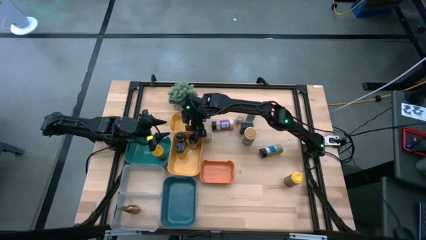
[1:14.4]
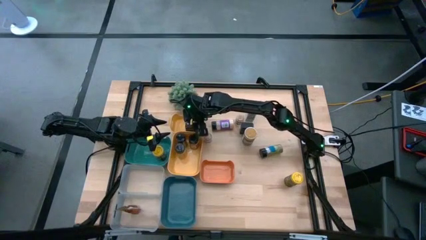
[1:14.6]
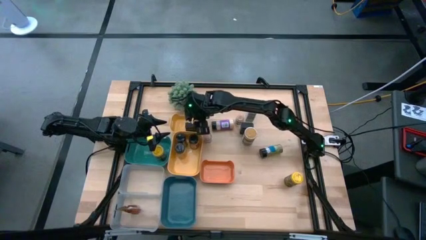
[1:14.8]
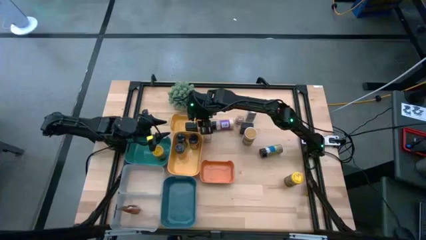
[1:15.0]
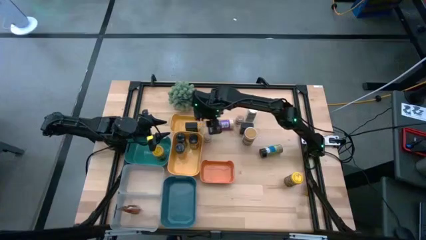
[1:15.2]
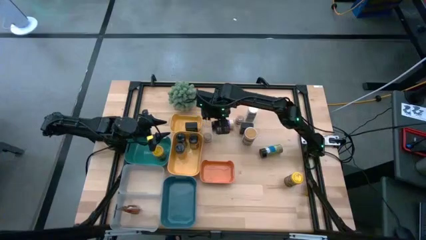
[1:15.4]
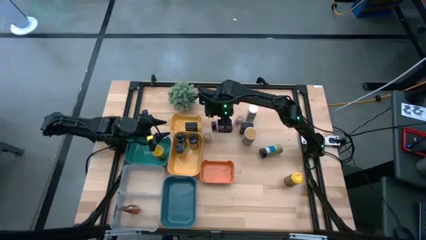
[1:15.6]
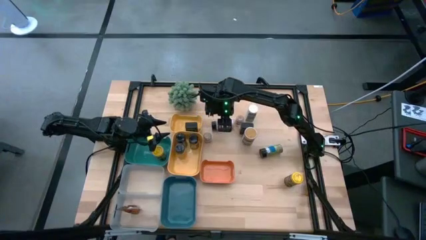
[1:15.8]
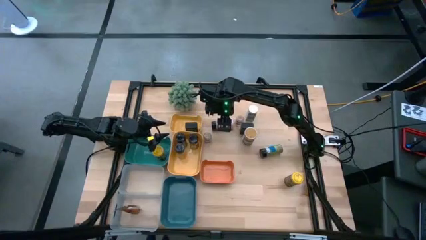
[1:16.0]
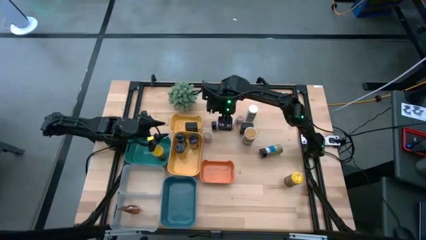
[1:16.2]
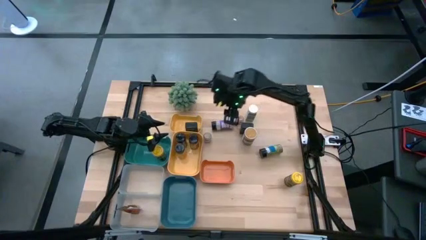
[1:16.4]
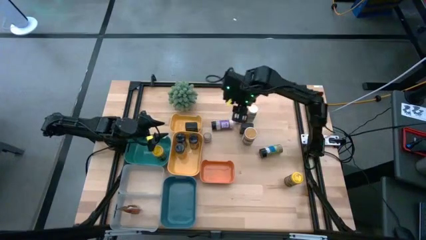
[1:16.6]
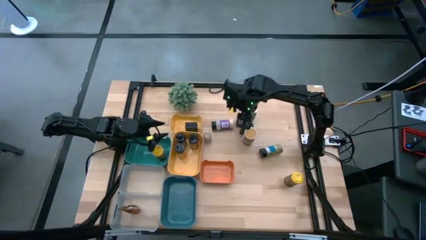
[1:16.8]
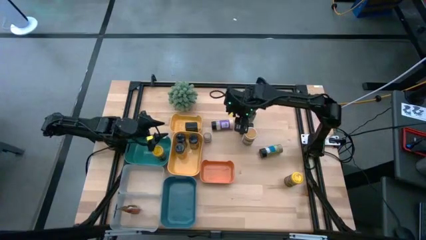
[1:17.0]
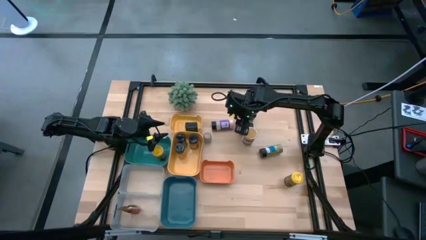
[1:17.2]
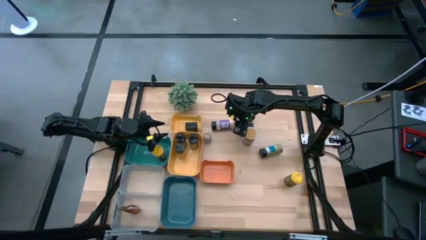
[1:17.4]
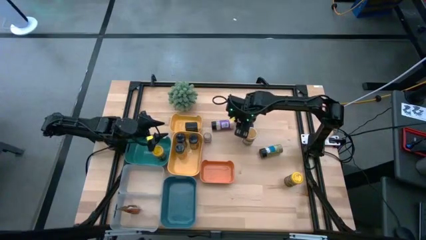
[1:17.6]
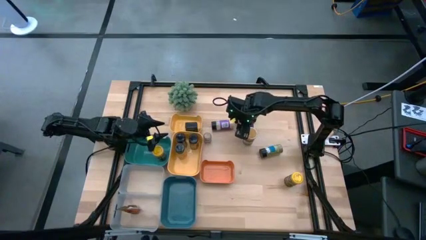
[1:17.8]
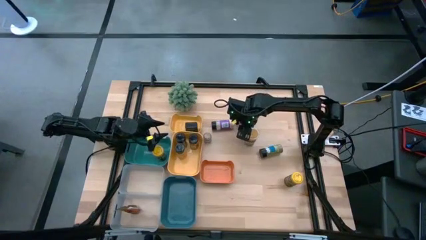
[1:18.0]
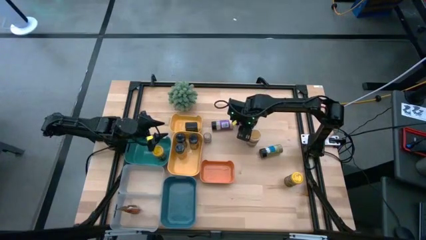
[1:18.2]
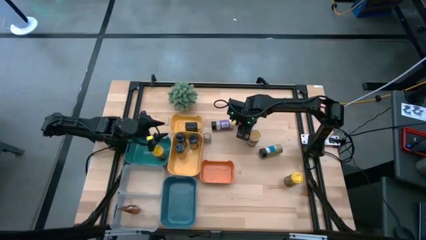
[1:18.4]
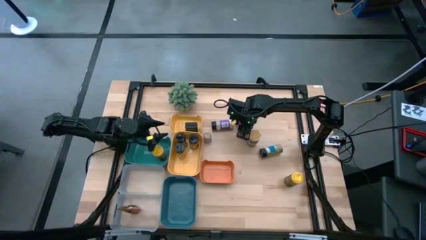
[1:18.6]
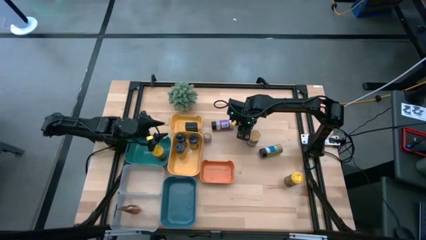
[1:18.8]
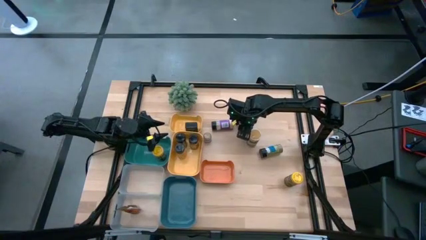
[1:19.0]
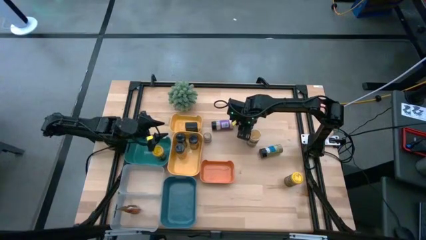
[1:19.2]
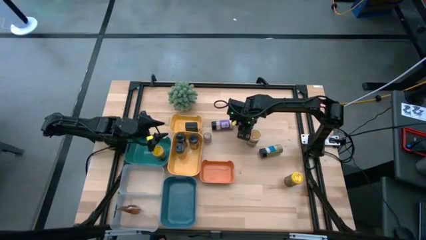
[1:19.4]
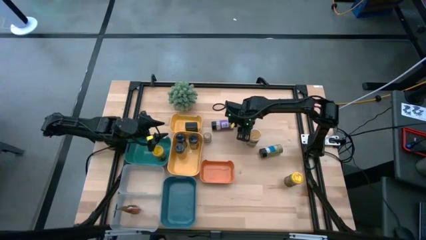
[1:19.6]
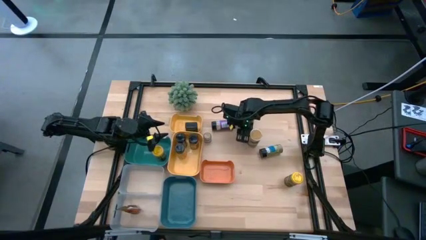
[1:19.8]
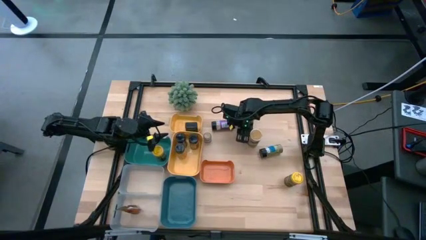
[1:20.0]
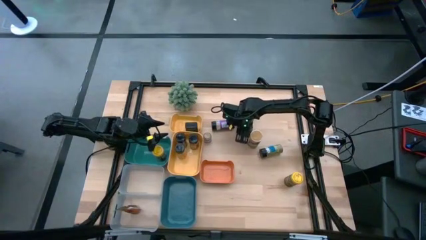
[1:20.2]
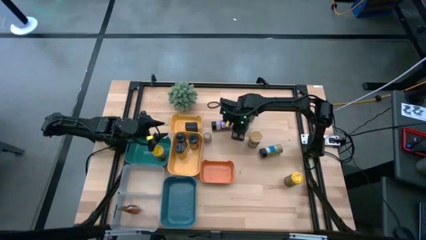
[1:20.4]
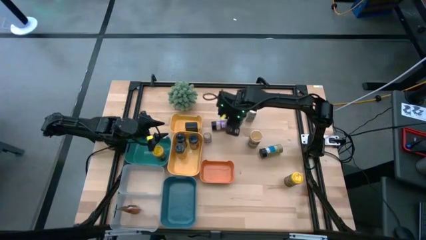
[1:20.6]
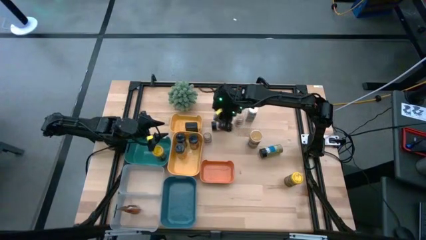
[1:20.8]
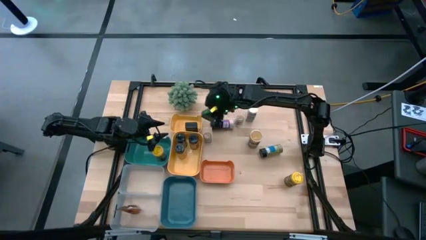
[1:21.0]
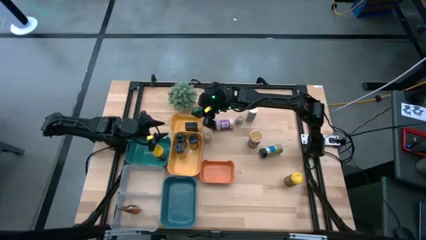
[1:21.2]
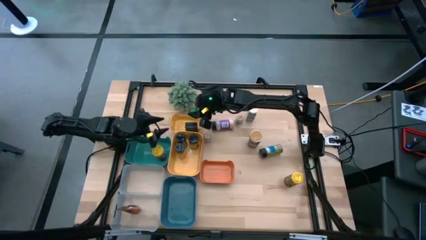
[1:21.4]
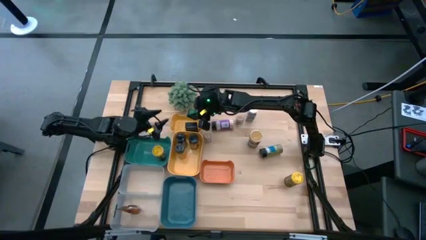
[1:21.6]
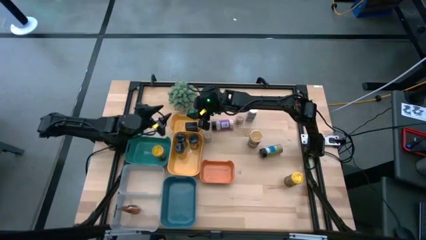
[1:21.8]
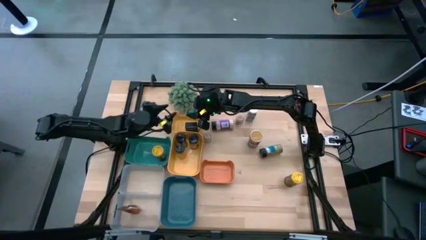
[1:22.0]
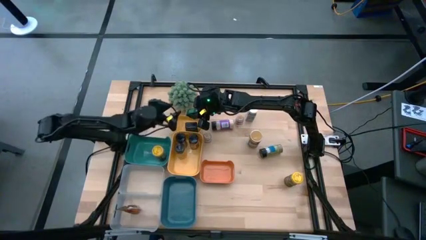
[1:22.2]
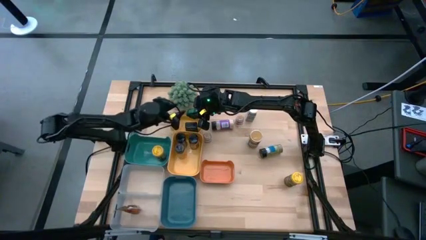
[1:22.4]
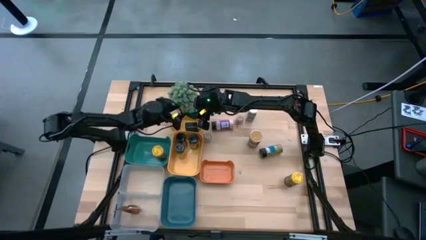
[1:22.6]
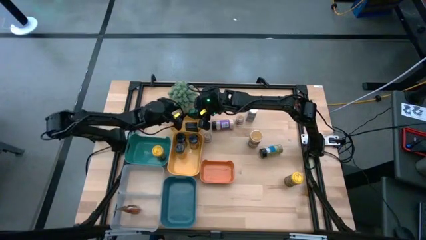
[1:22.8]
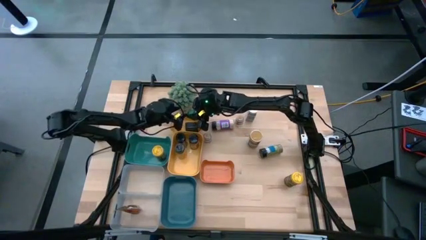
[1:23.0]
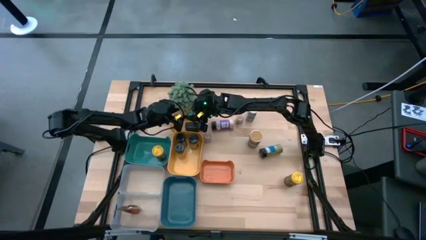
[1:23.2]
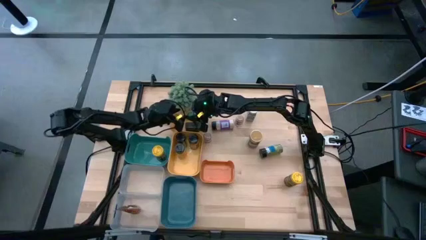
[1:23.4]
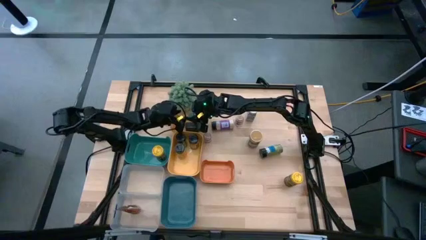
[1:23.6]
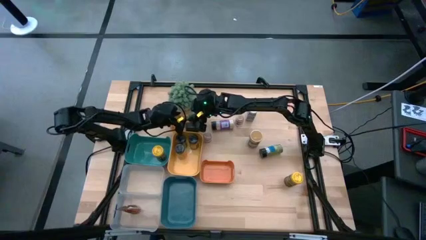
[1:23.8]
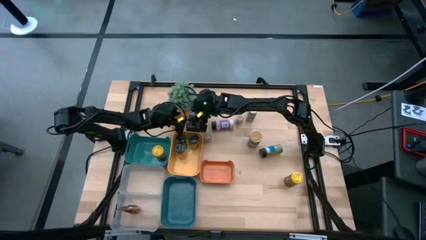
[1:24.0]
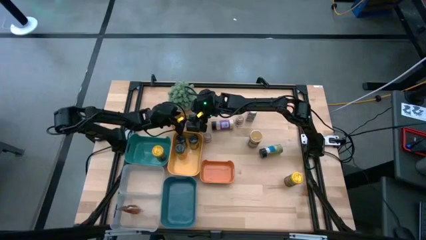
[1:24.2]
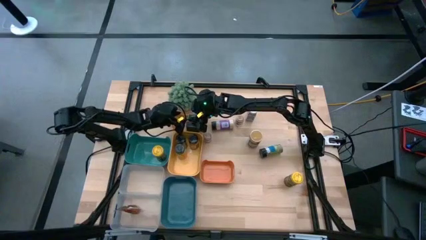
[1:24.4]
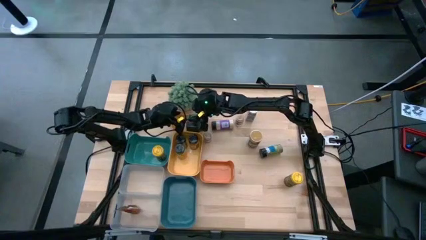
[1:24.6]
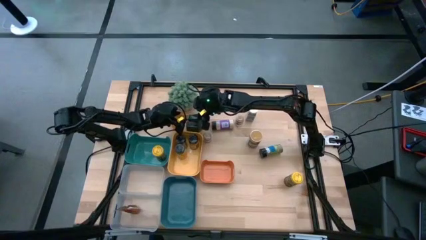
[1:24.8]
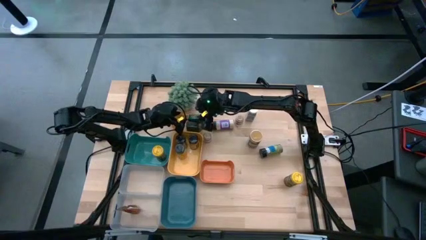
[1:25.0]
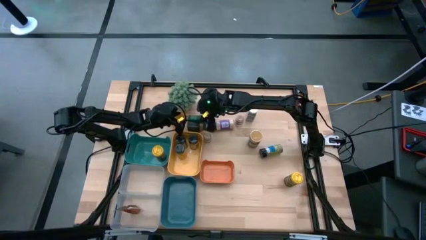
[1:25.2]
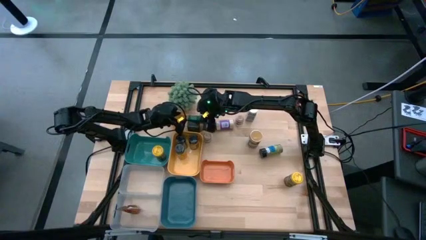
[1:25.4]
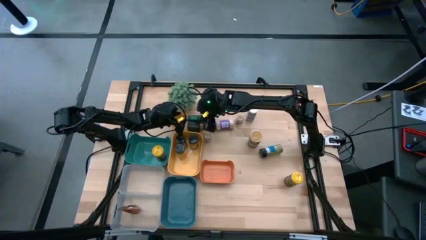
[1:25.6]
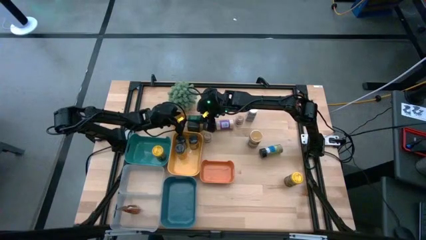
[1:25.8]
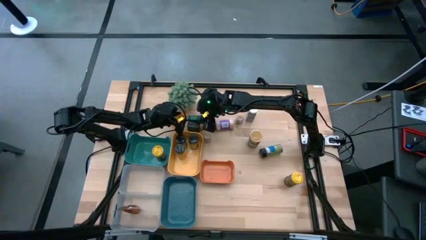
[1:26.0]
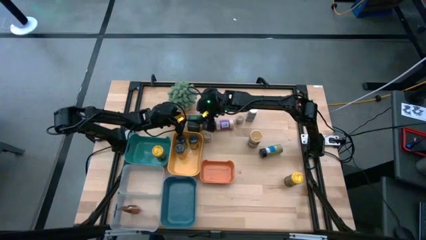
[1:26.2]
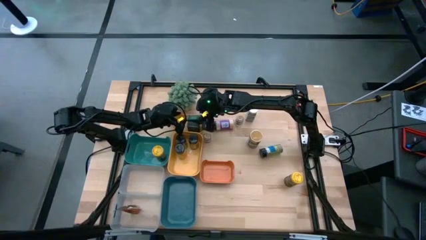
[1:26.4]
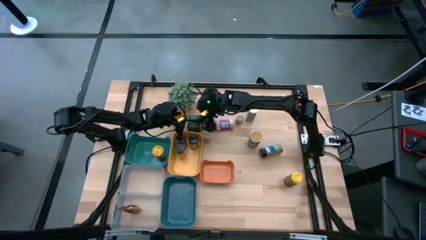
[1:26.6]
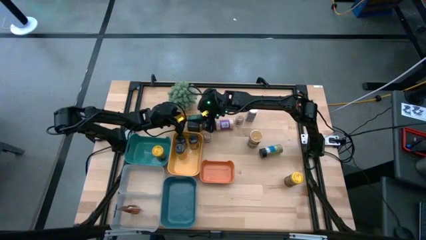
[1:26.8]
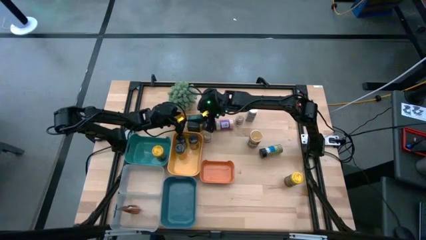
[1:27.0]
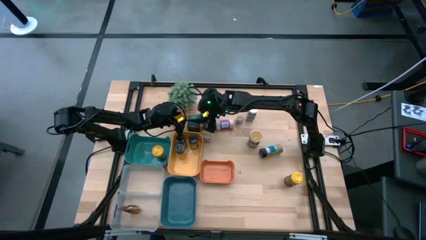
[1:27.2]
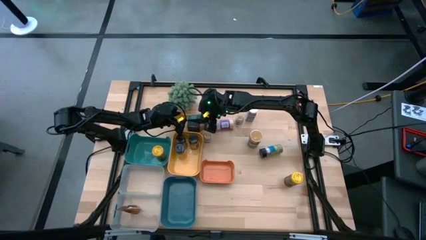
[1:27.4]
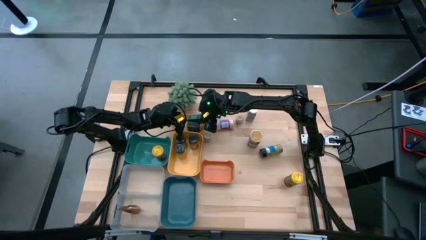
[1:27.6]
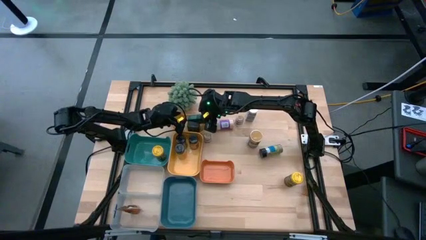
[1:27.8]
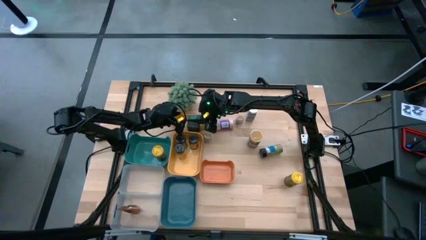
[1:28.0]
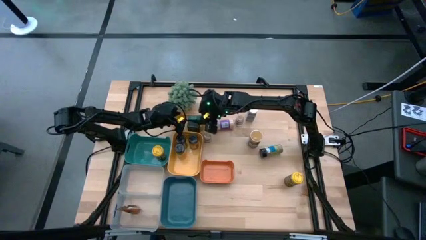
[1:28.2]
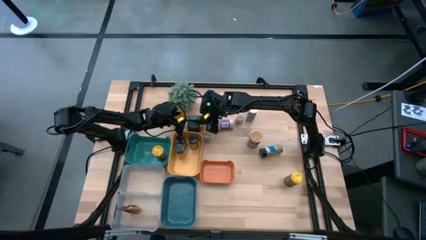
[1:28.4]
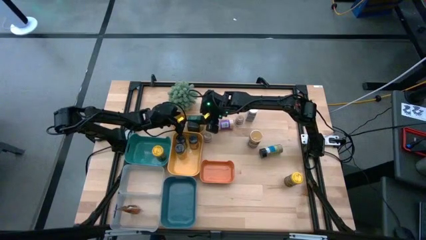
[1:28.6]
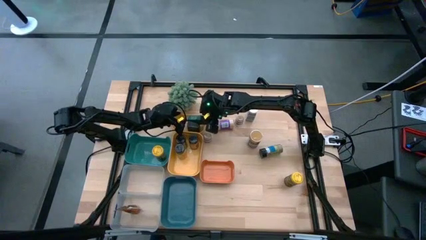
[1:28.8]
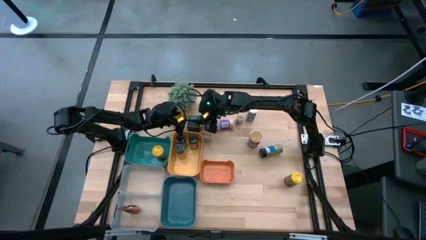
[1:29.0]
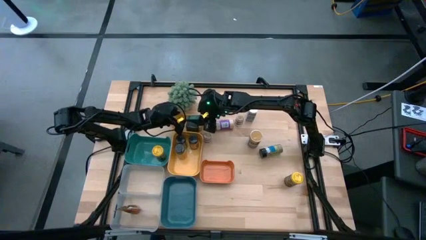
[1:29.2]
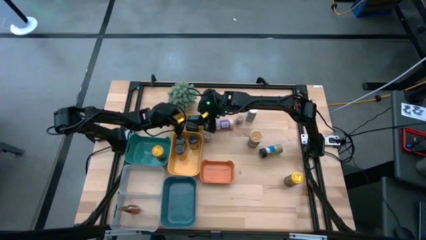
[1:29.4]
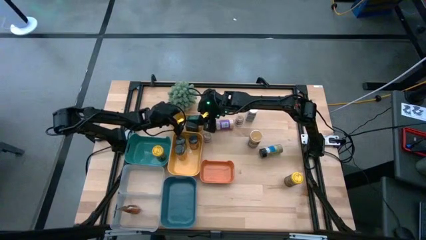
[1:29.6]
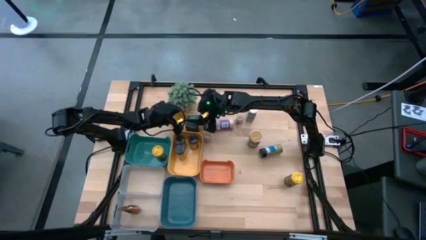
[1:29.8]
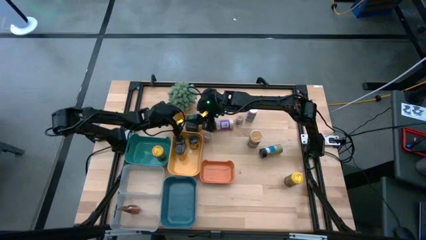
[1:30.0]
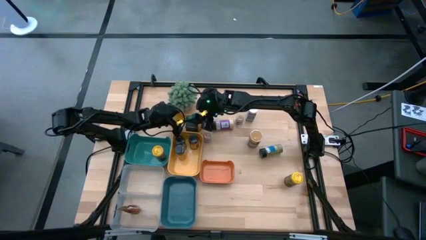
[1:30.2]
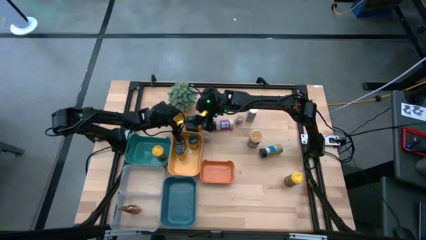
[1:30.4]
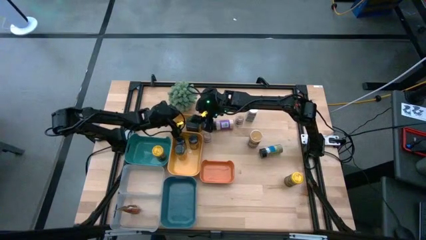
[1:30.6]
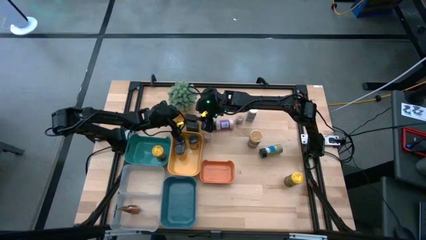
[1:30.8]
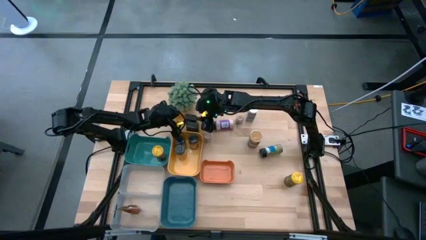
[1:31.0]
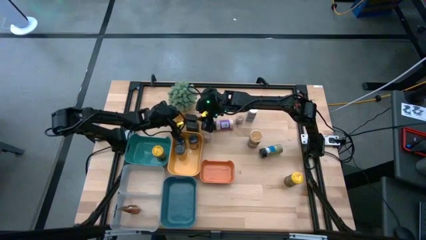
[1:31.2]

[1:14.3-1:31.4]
Task: Sort spices by type
Put the black seasoning can into the top yellow bin
